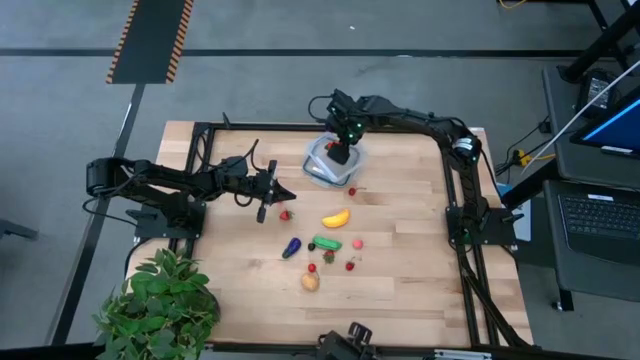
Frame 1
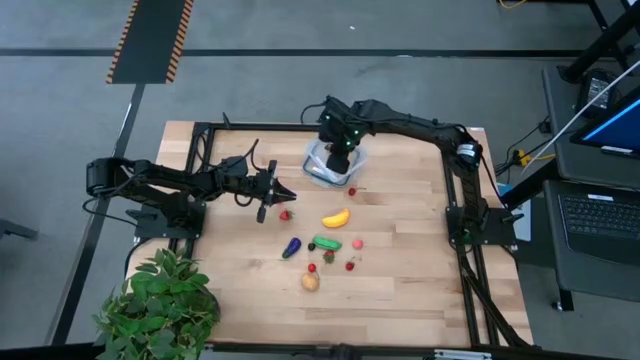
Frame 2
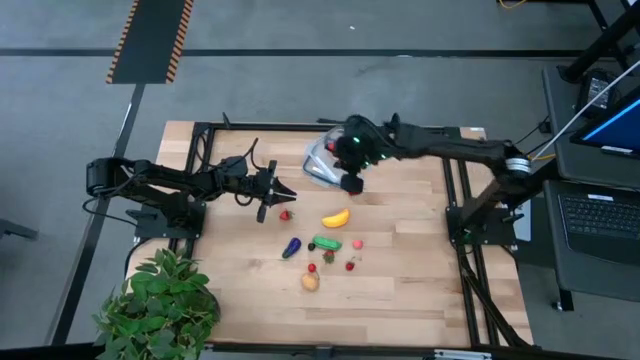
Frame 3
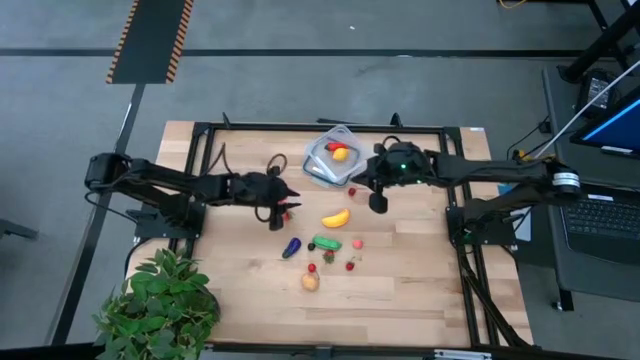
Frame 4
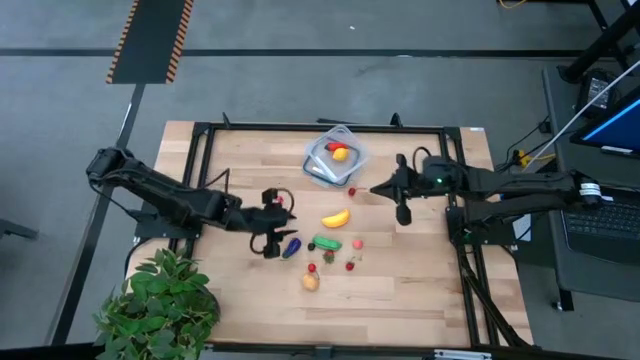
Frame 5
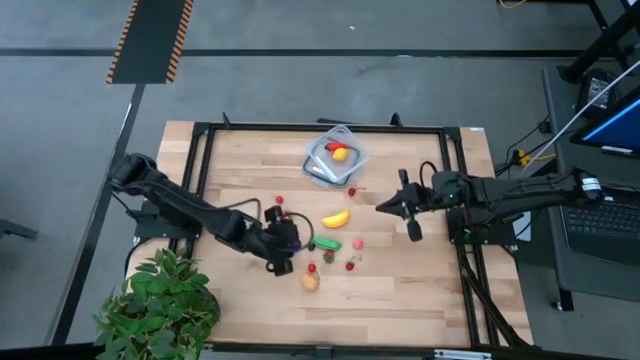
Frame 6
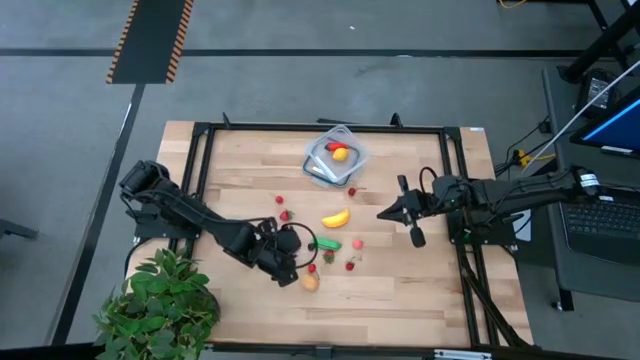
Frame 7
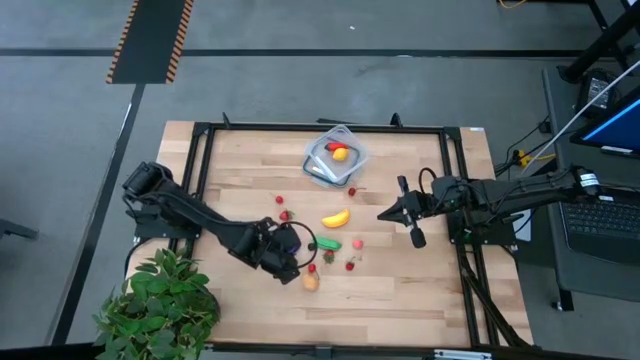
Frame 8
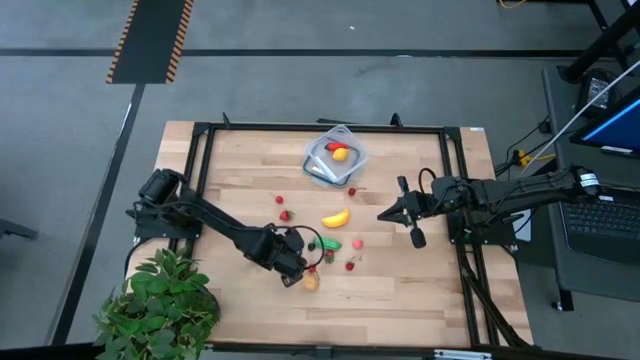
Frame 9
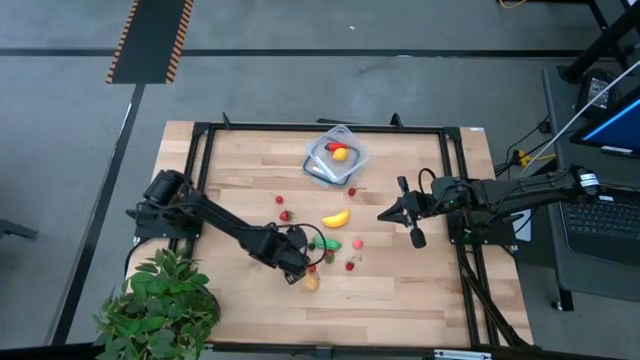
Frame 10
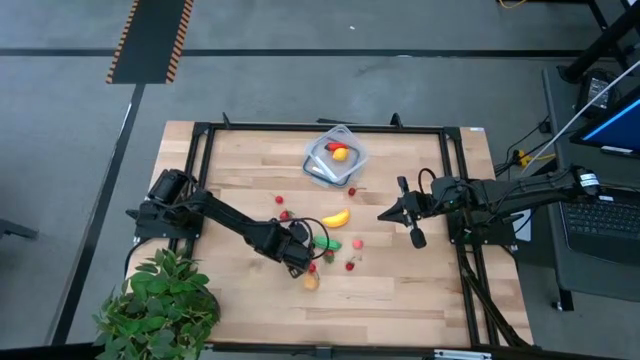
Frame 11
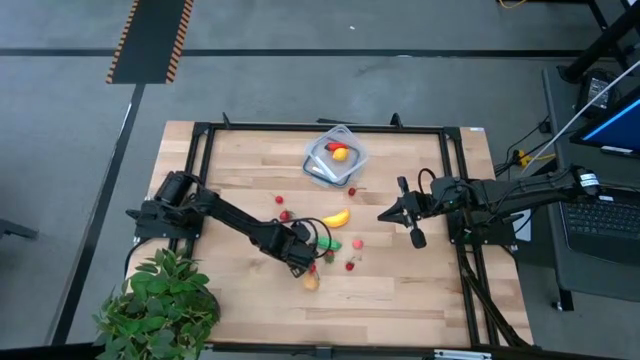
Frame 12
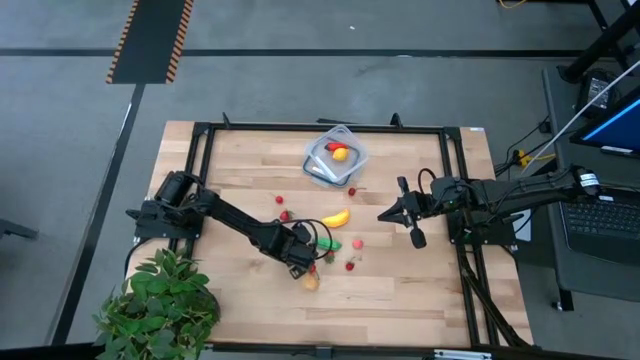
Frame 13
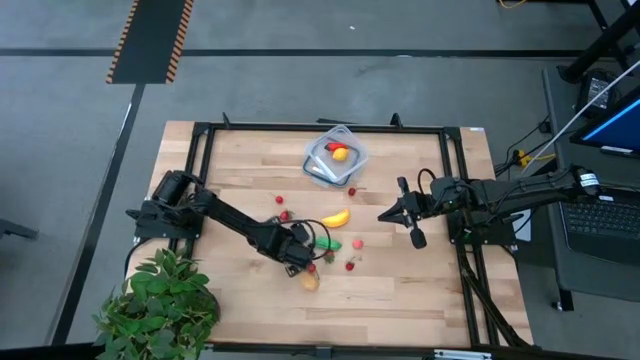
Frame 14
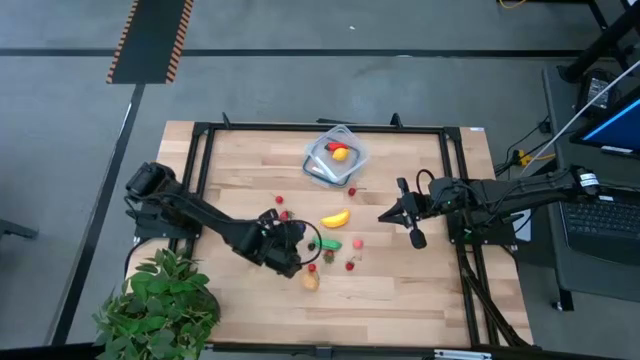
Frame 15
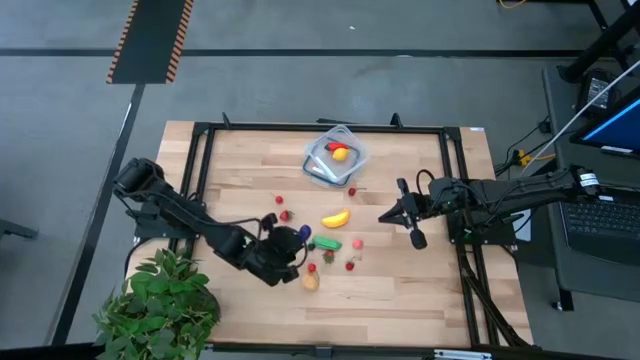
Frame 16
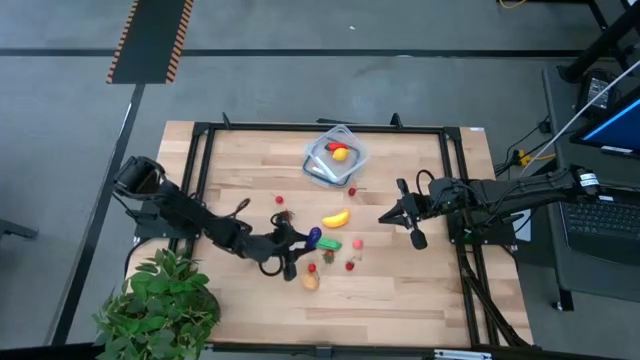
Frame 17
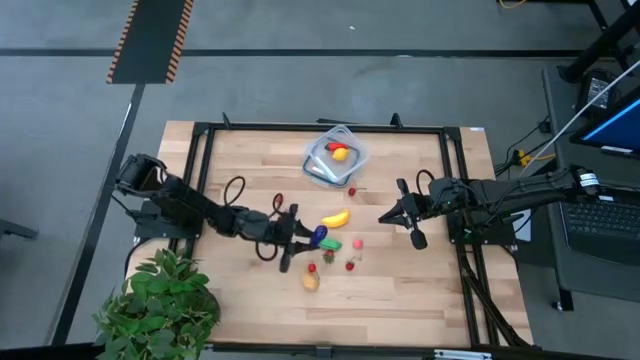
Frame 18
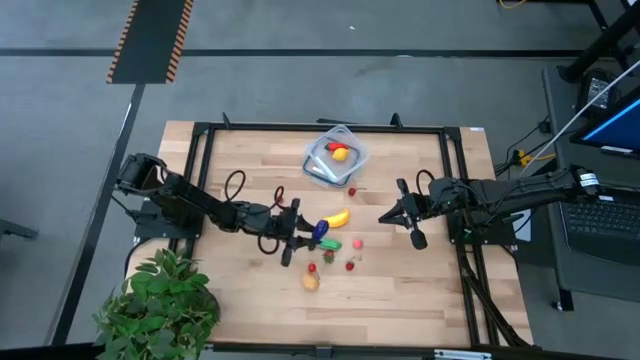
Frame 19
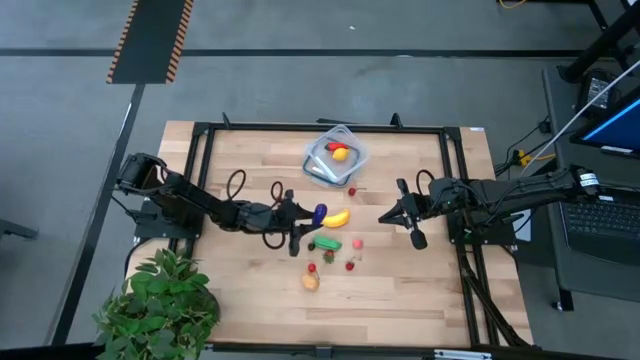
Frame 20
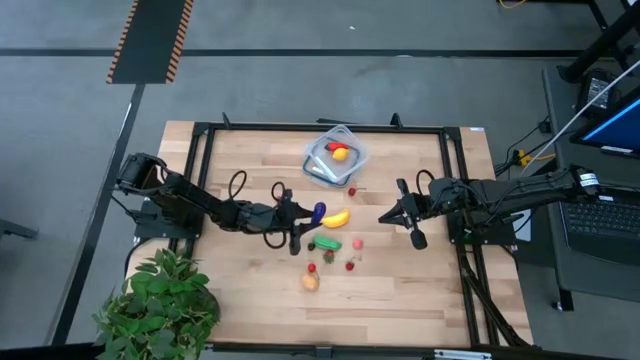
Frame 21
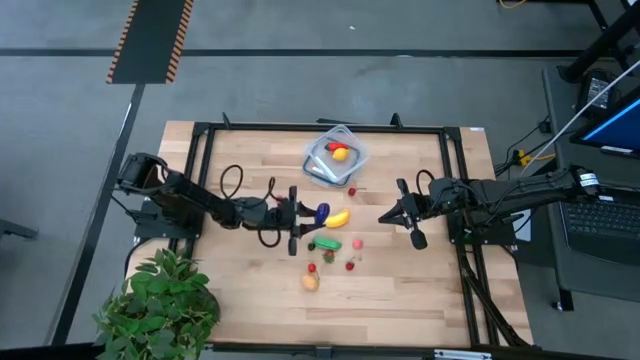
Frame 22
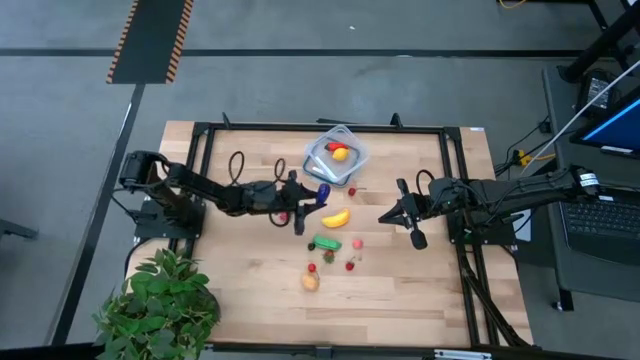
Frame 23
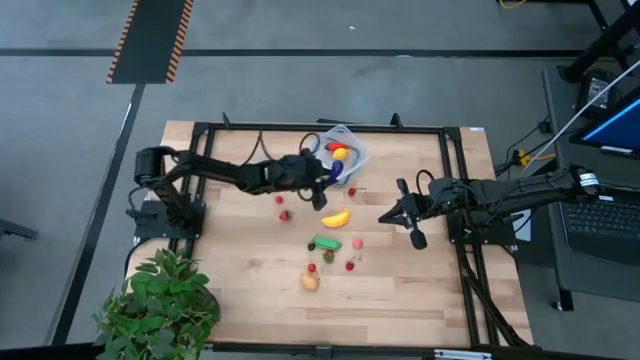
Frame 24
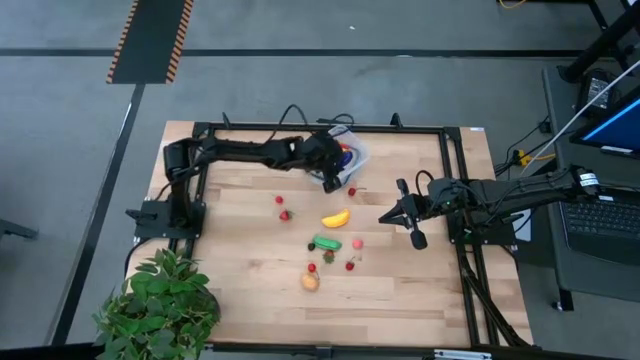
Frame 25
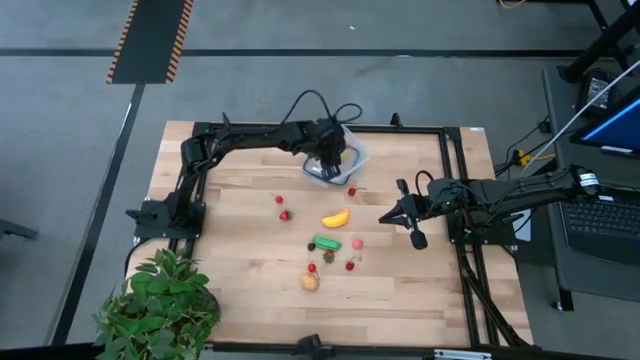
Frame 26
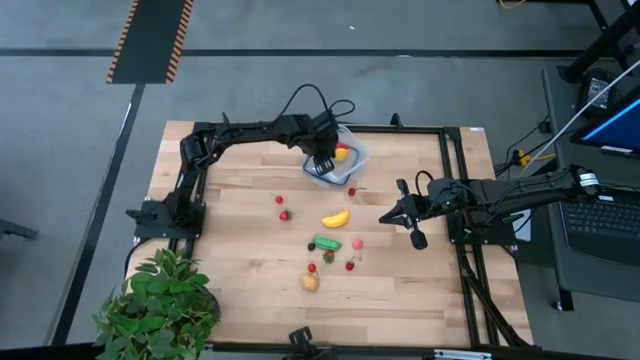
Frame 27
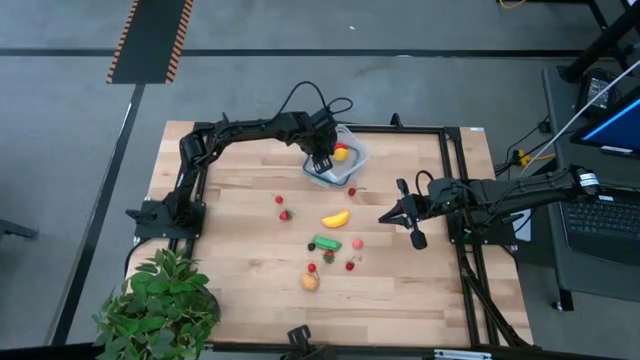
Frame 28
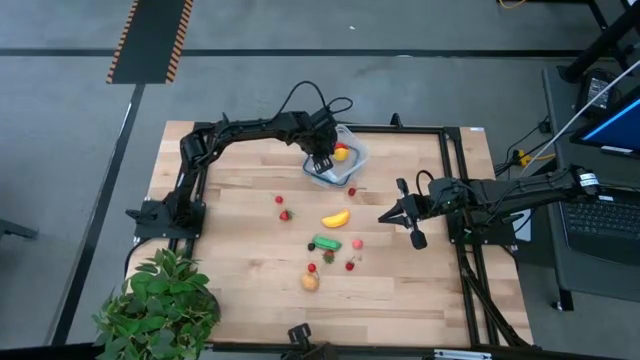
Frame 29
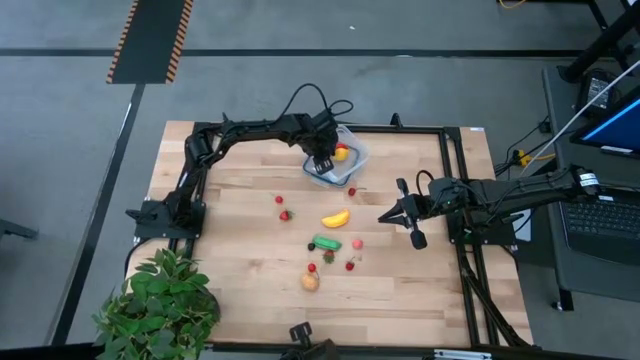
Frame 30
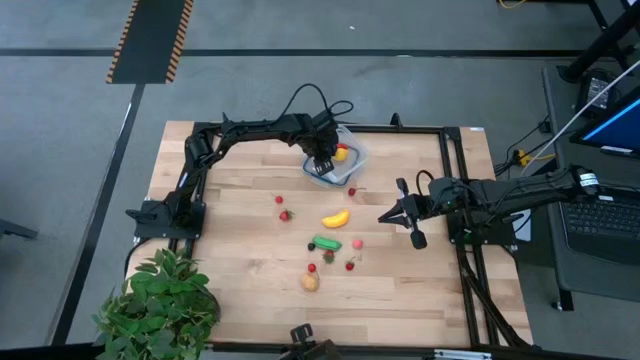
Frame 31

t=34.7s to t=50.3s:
Task: Pick and placing Produce into tupperware
Put the violet eggplant into the transparent container

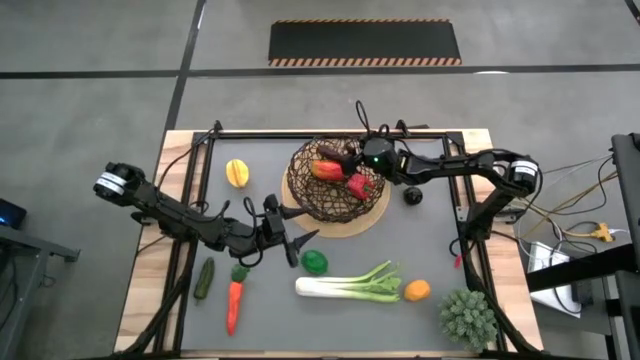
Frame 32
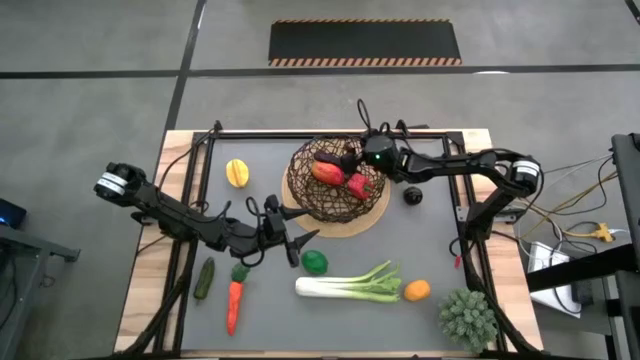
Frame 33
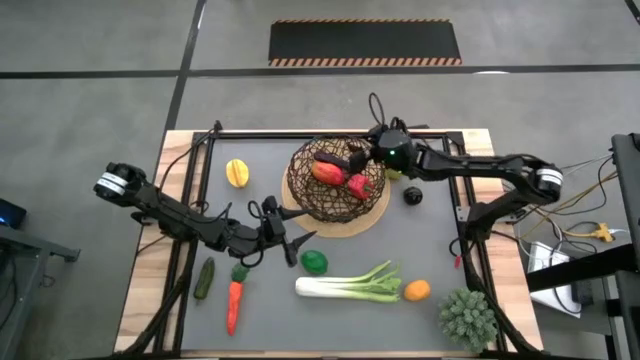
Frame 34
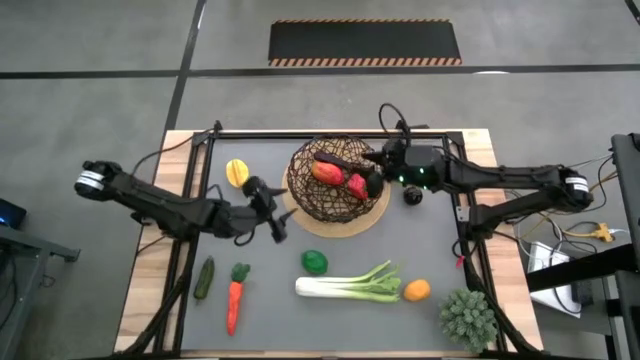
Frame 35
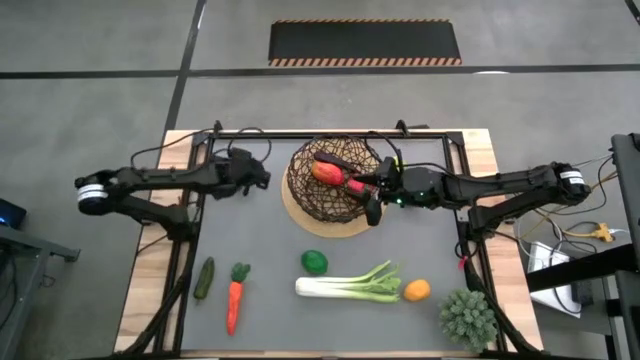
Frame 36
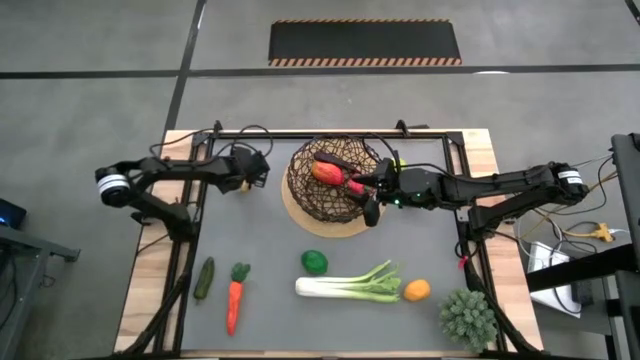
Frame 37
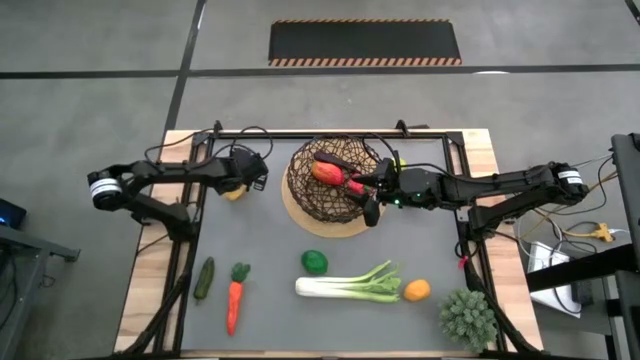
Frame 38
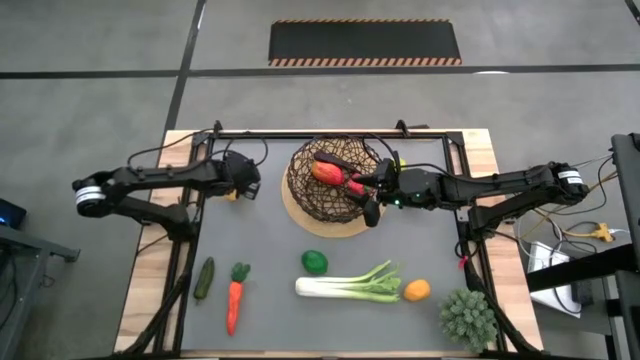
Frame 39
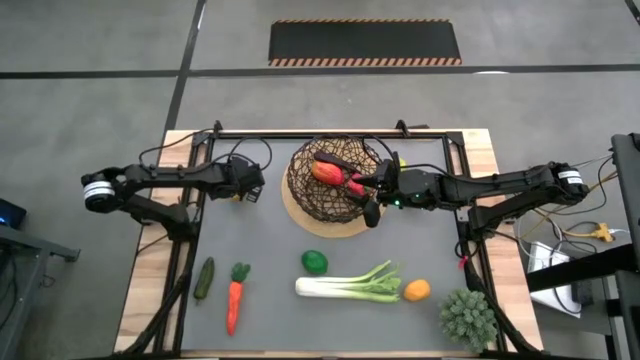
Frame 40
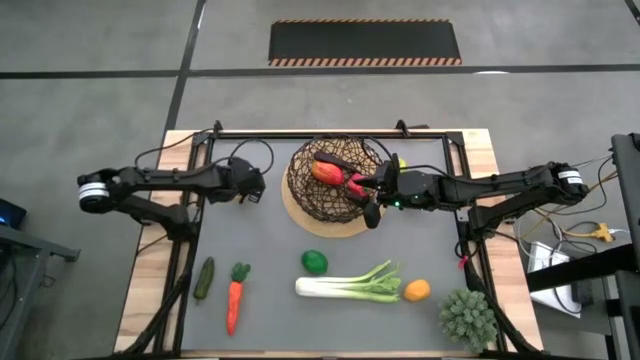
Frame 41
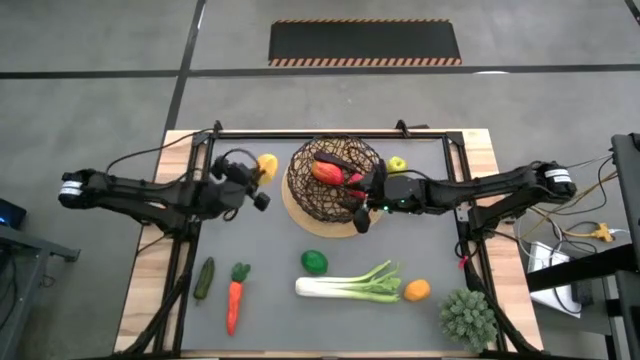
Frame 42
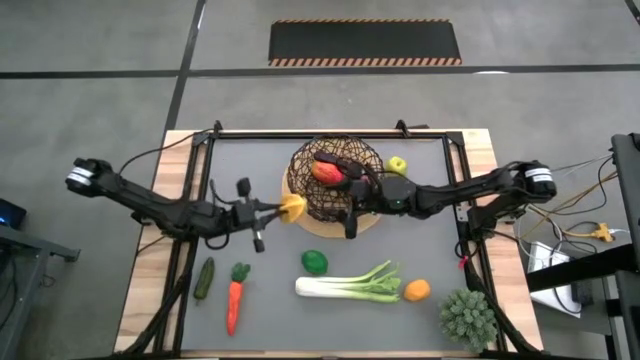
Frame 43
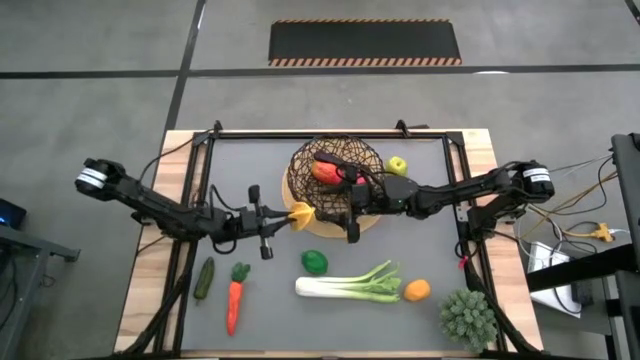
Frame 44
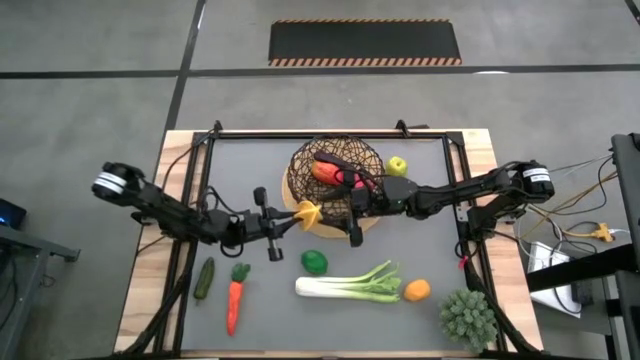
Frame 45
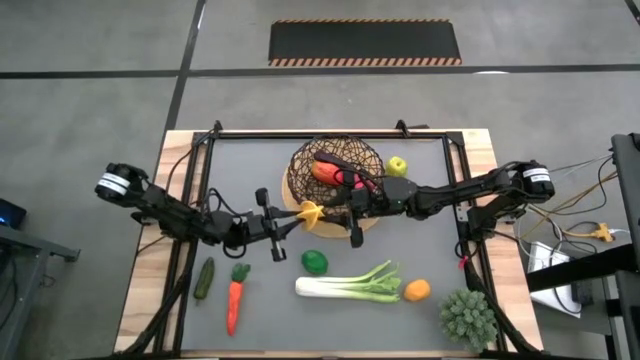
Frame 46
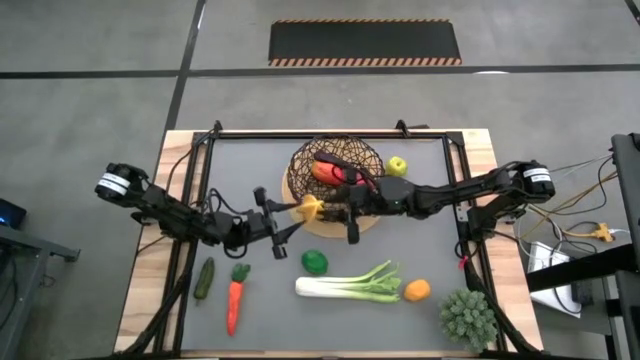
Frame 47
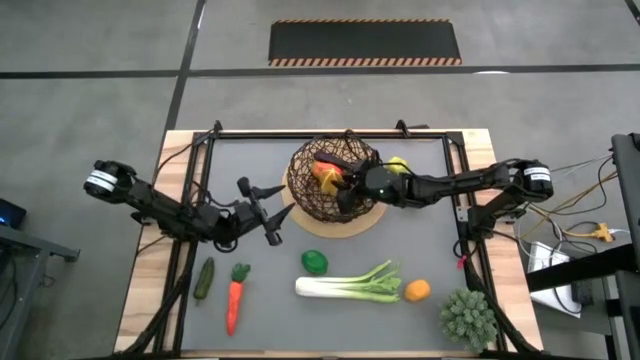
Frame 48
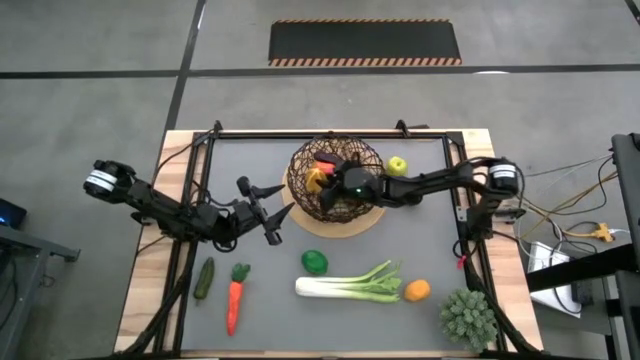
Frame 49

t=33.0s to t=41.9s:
Task: Build produce basket
Put the starfruit into the basket
